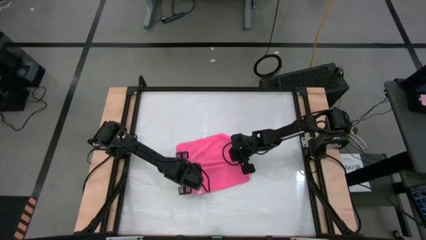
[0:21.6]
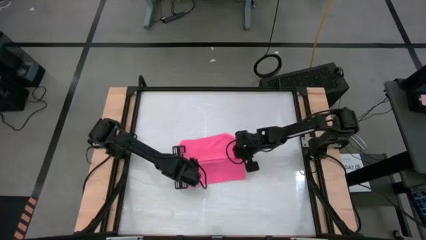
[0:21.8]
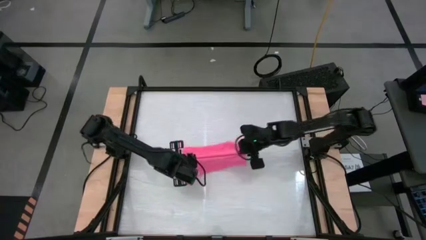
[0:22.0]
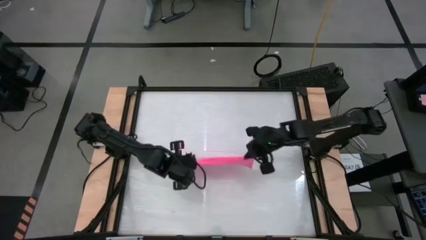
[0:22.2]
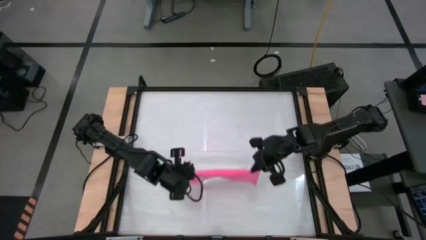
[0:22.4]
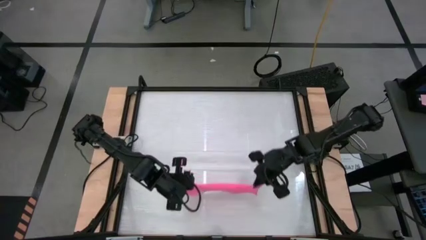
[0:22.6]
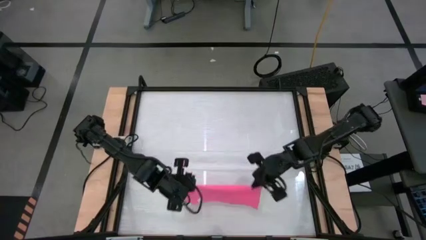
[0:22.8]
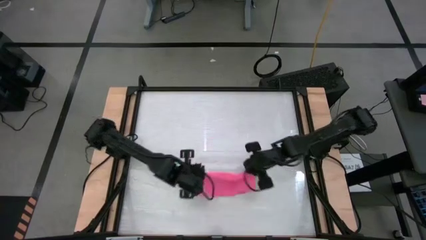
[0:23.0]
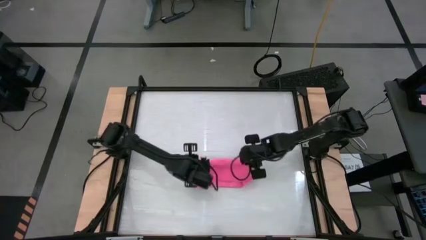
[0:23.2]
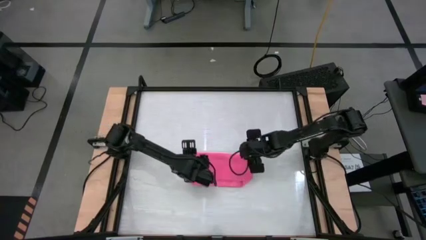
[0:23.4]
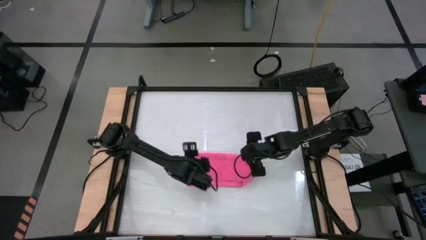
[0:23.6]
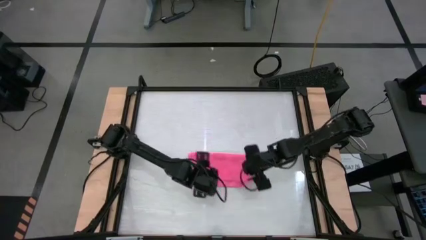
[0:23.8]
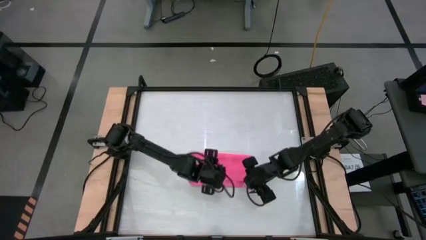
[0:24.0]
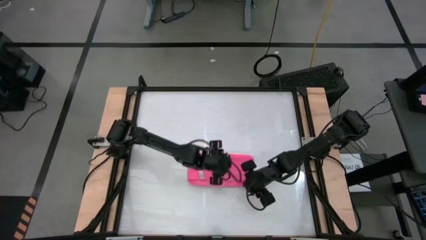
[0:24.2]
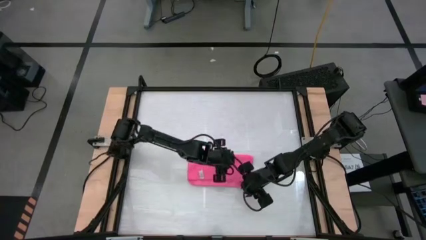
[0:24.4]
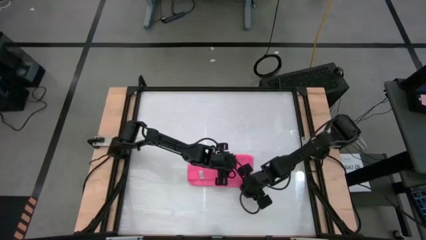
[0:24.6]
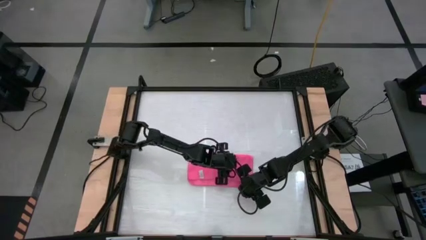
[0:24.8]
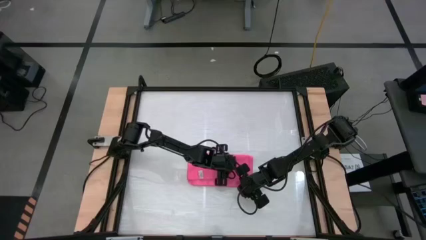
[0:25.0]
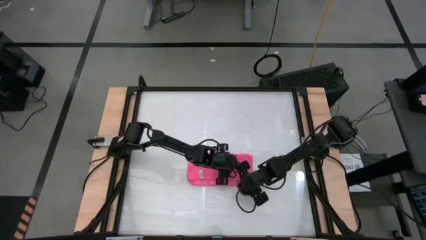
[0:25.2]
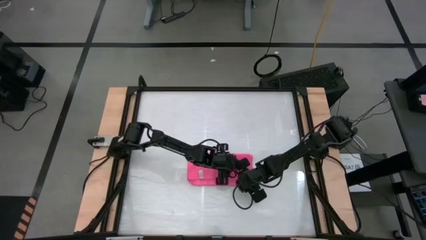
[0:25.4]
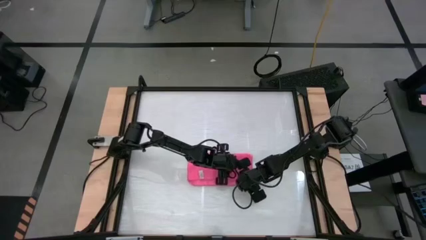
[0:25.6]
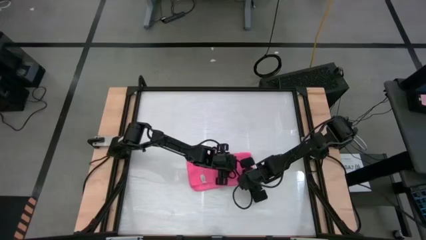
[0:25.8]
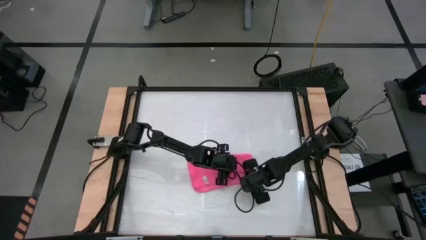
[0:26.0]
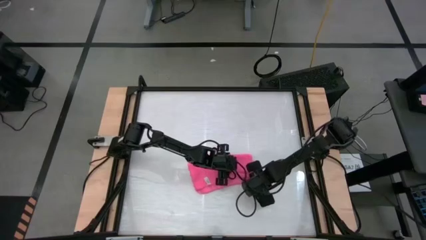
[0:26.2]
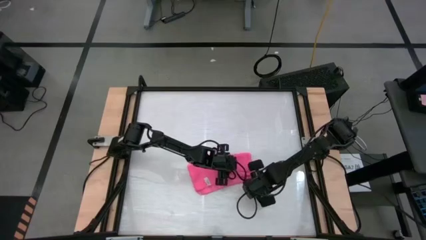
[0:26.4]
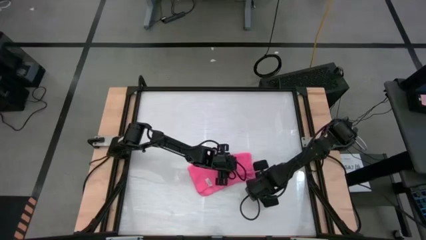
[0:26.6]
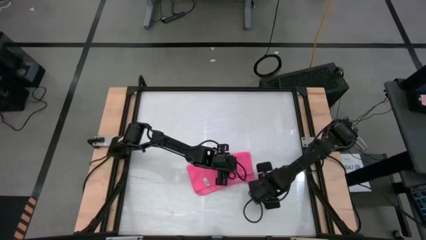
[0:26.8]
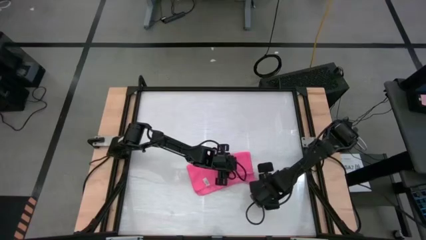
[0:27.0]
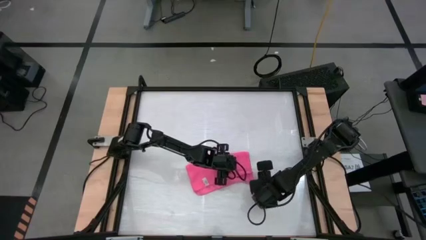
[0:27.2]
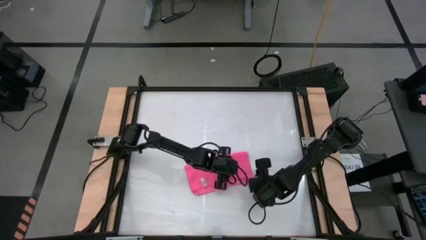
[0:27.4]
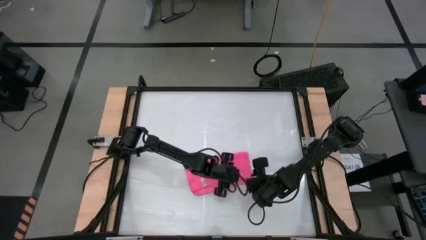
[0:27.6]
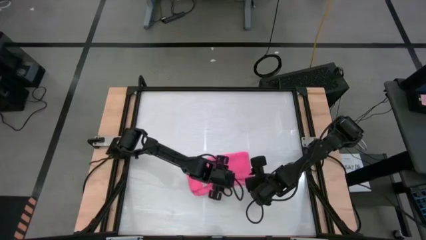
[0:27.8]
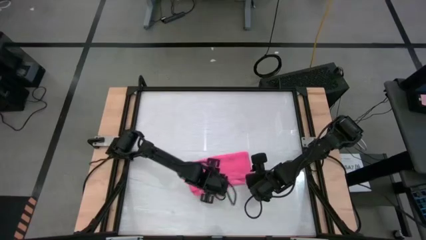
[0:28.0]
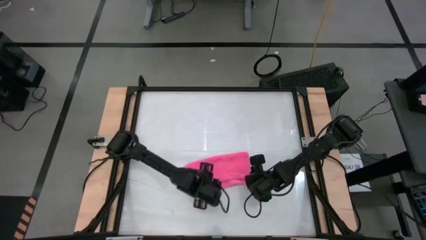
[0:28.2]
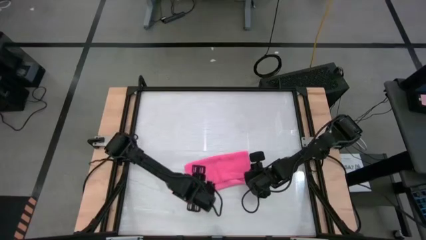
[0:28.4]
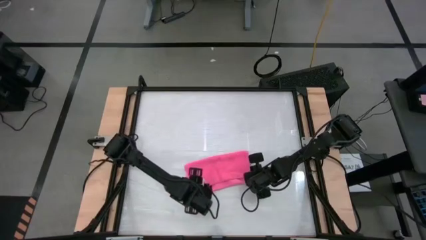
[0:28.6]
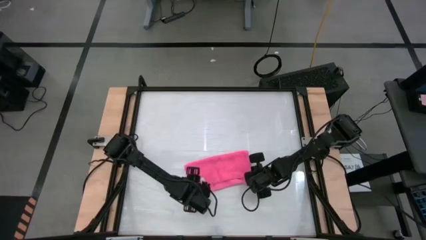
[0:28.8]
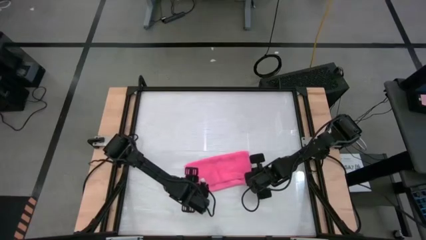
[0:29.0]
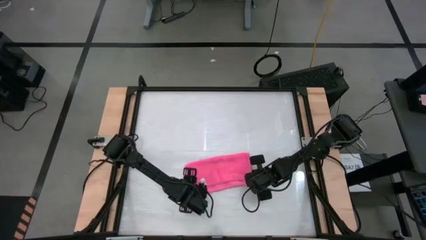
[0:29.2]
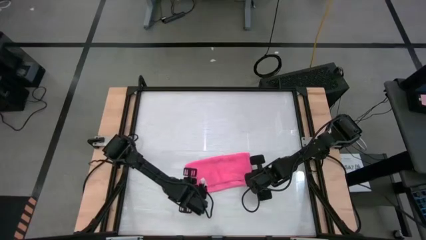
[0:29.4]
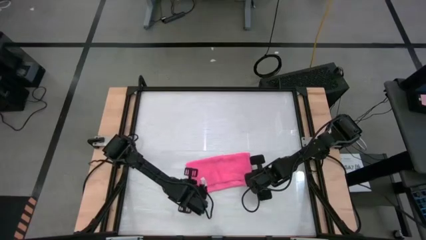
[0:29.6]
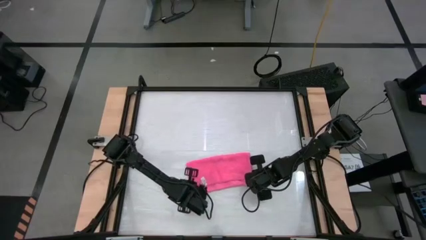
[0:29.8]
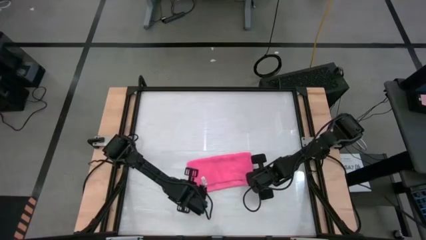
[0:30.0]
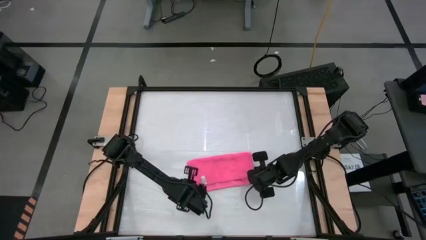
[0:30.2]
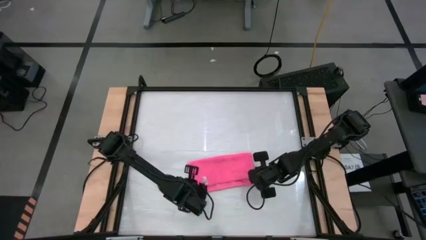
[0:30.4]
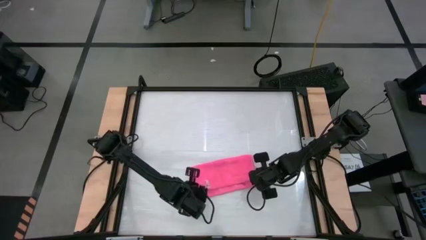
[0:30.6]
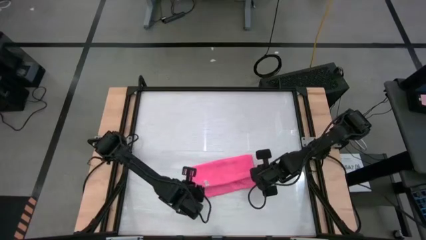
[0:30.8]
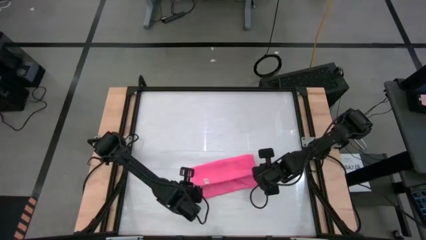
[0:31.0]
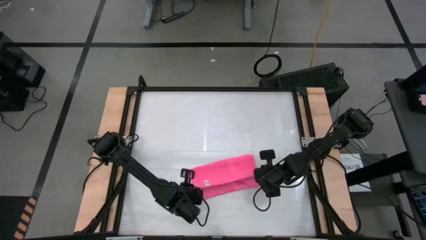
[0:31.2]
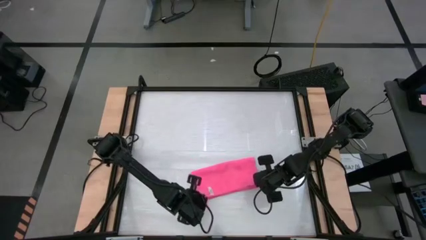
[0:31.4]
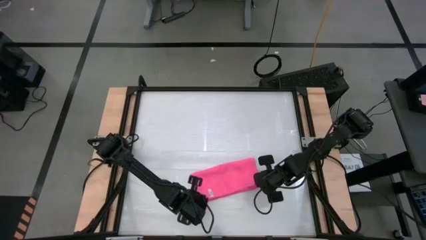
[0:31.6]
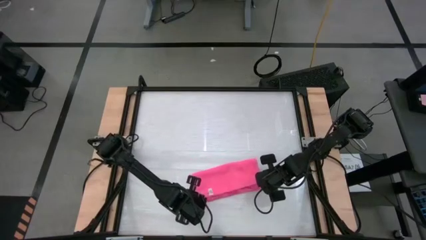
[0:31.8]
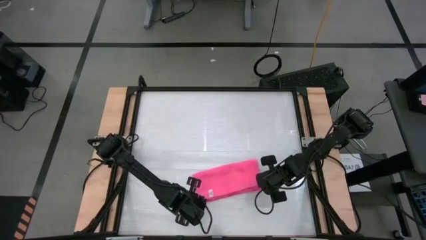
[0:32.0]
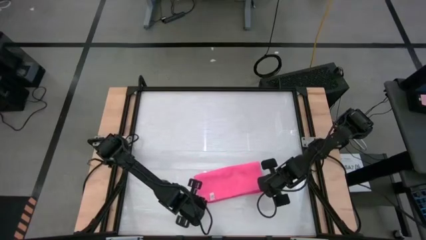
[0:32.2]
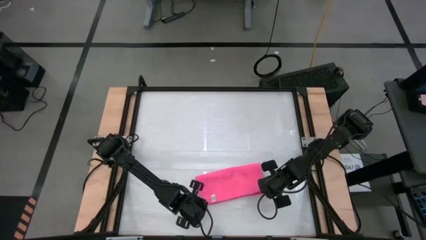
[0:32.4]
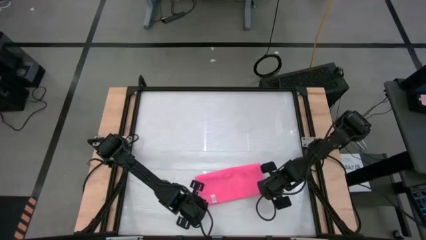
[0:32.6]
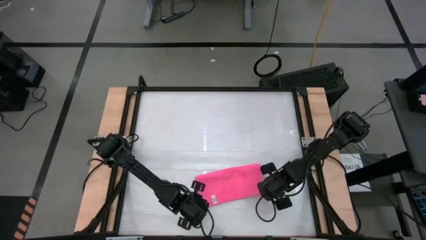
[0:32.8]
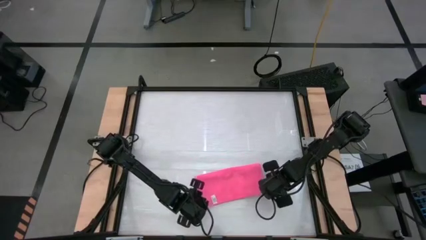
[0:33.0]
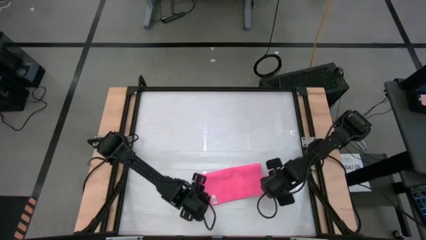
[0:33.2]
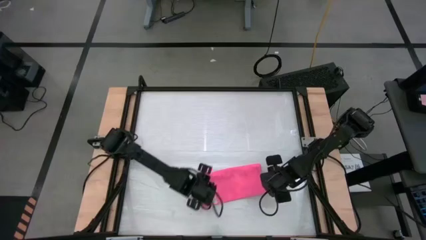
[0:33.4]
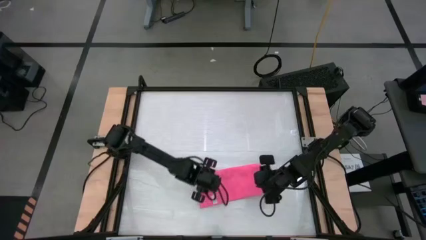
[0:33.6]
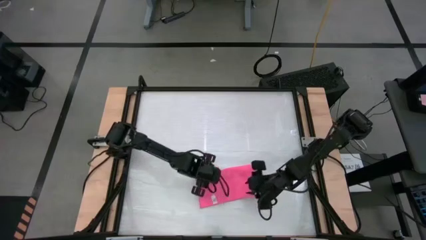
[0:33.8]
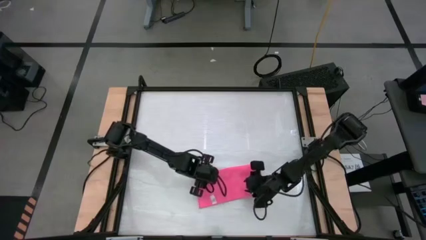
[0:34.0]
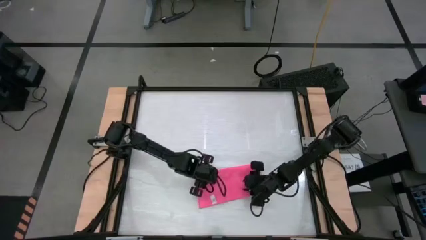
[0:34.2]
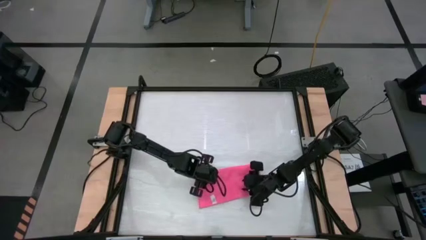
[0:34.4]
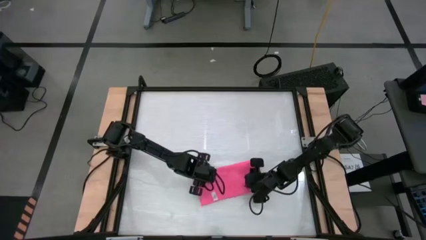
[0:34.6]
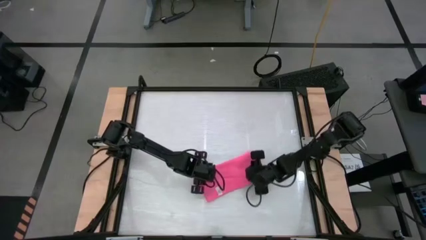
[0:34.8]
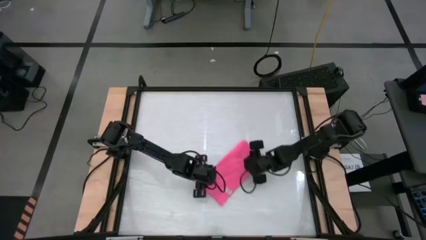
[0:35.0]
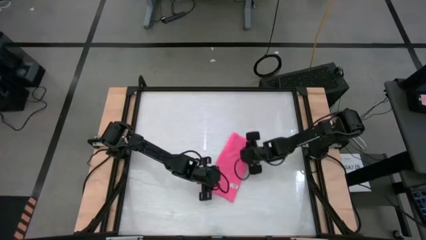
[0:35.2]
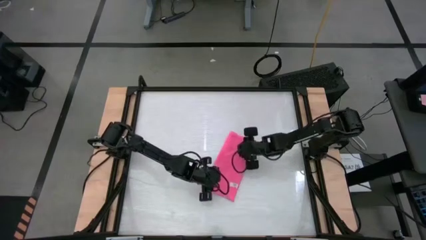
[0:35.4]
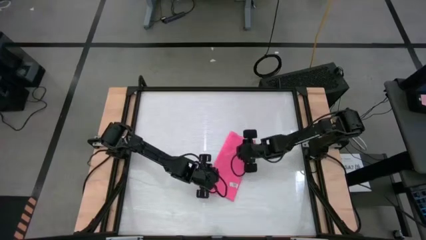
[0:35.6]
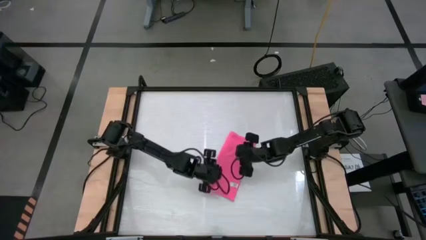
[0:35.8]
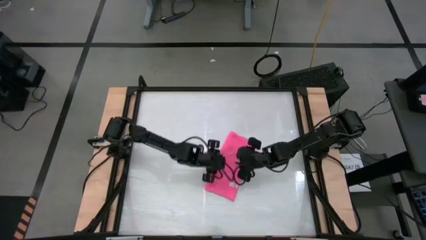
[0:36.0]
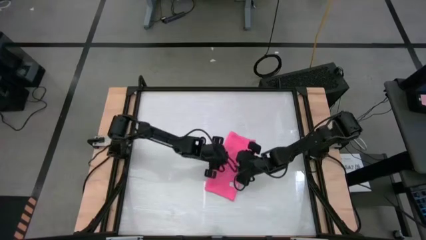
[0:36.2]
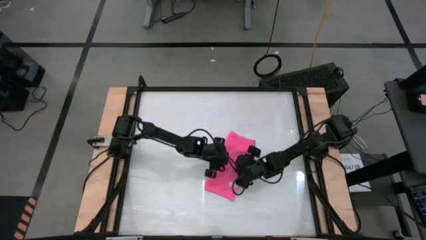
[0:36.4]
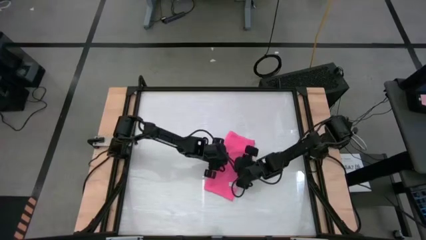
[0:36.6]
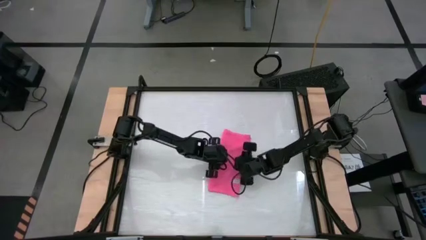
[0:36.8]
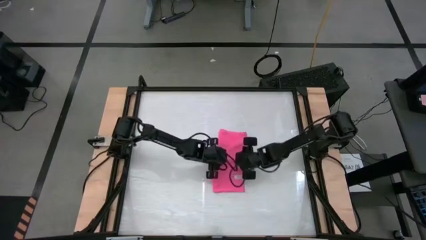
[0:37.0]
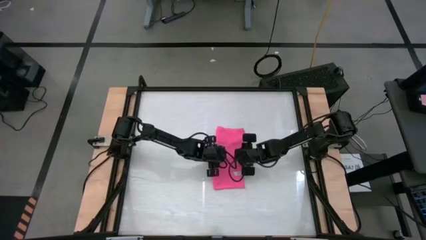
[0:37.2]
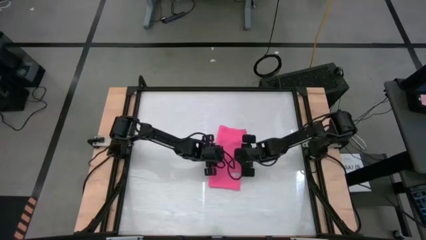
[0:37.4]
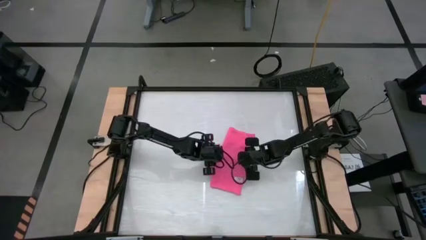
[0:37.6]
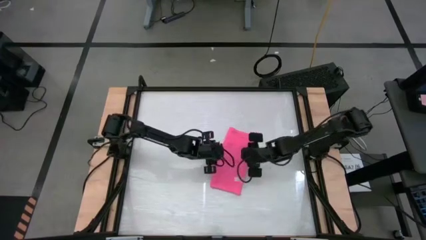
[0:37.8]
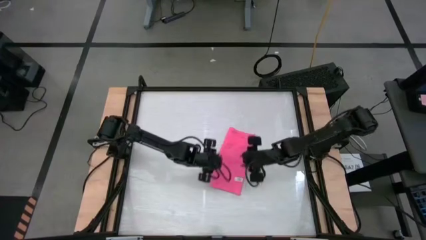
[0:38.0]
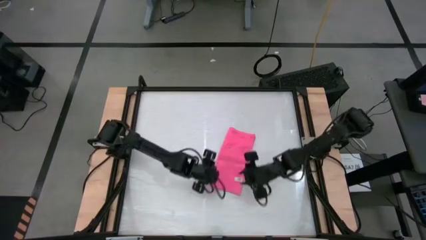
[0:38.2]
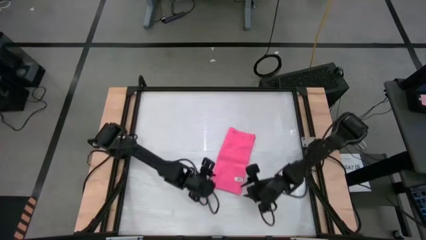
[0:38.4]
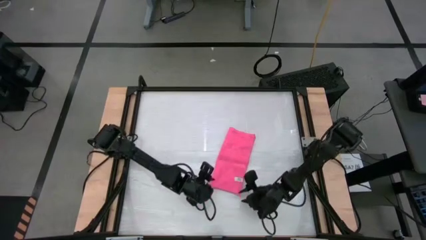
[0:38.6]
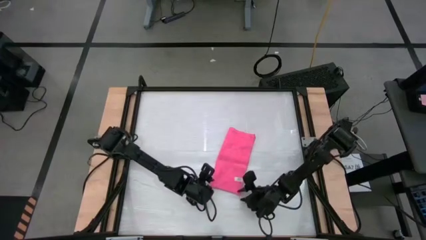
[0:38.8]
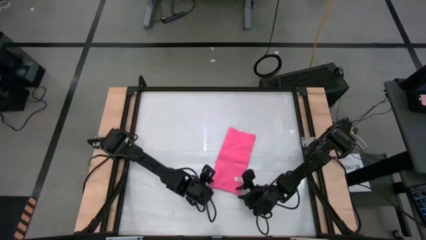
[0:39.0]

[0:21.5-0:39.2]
Task: Roll towel
Fold the pink towel
